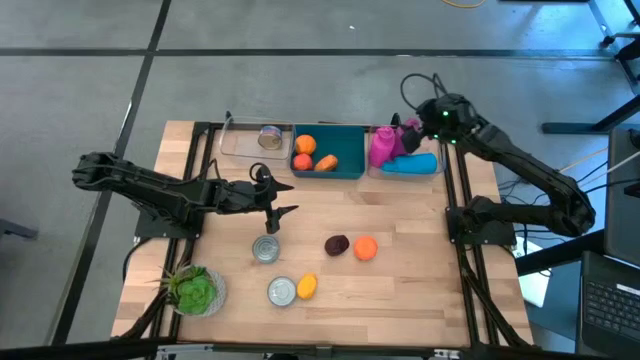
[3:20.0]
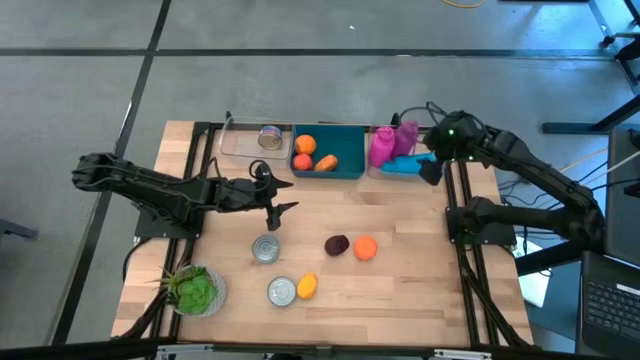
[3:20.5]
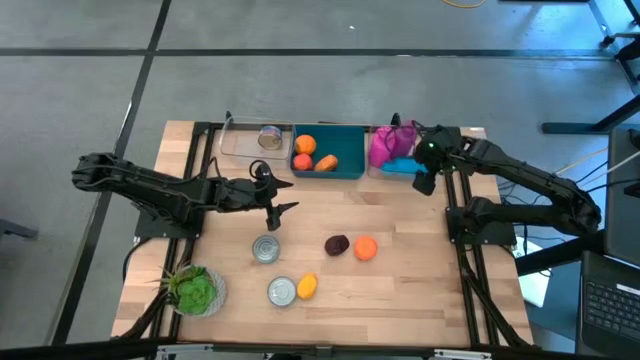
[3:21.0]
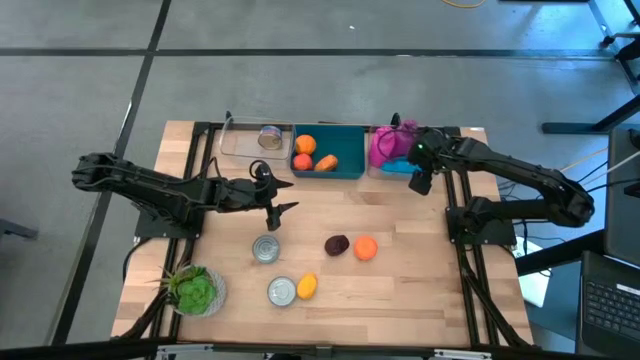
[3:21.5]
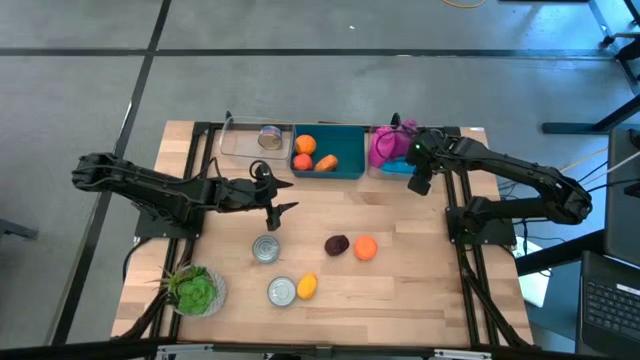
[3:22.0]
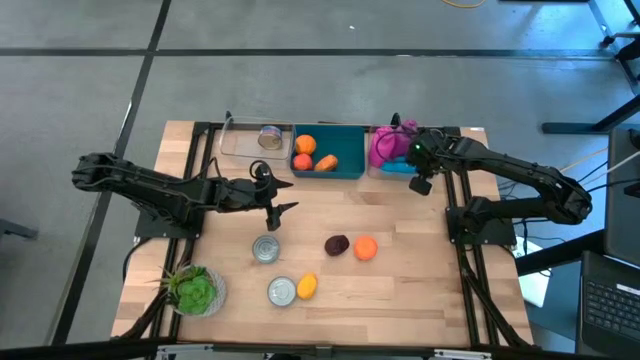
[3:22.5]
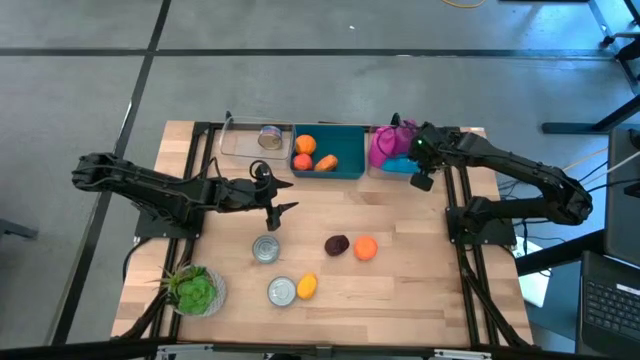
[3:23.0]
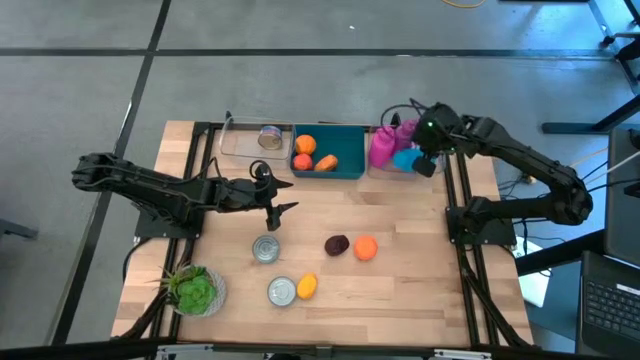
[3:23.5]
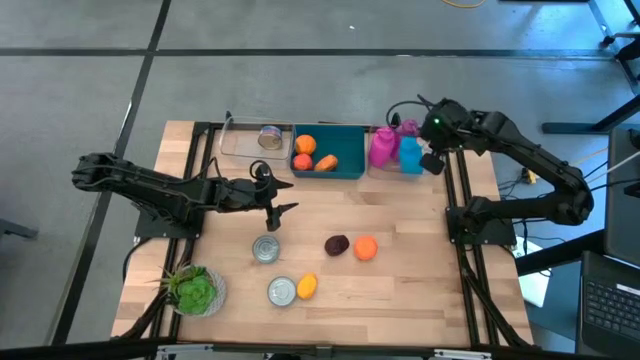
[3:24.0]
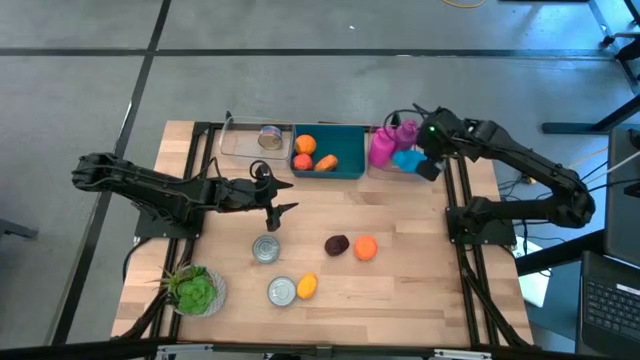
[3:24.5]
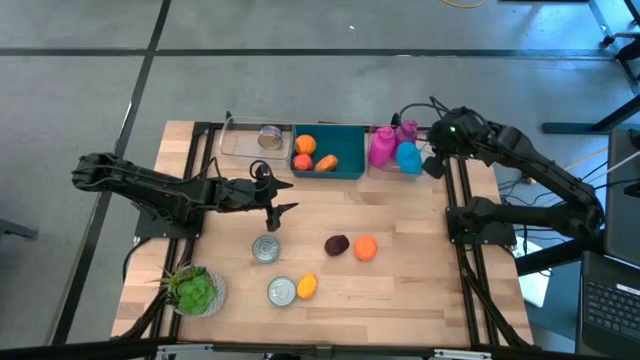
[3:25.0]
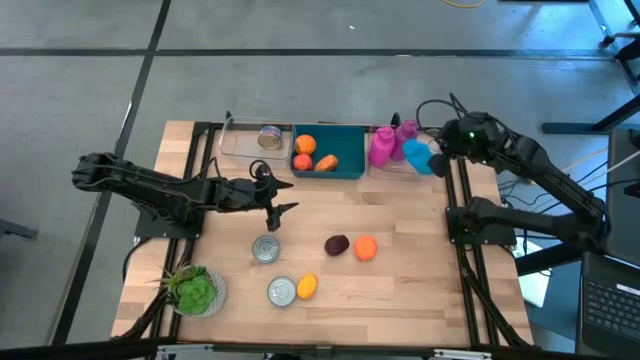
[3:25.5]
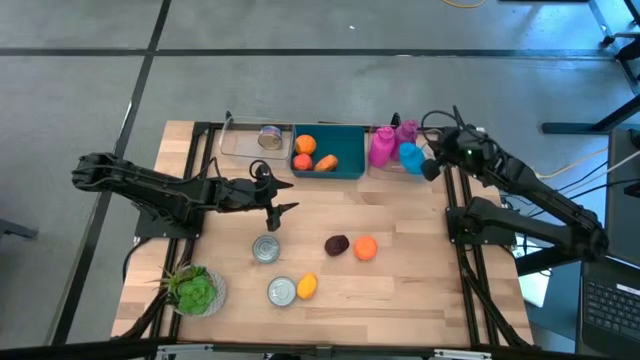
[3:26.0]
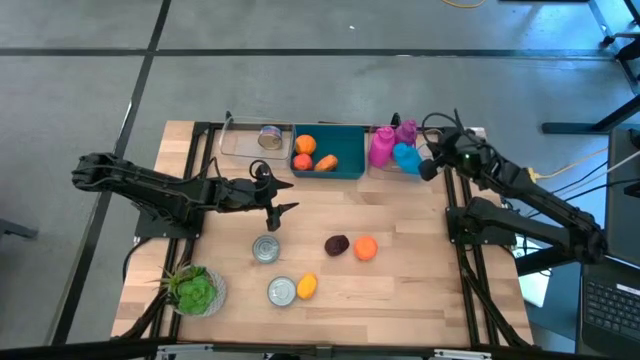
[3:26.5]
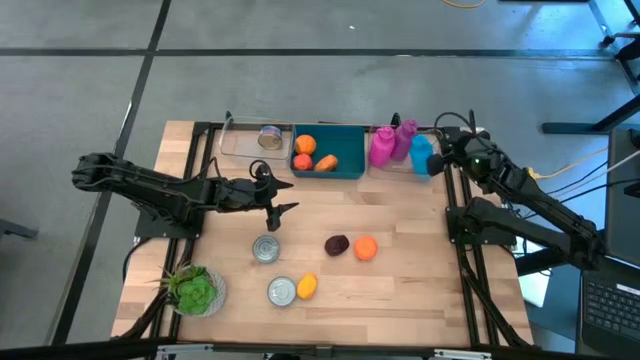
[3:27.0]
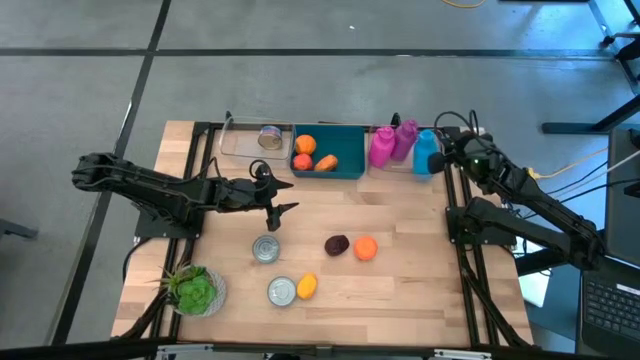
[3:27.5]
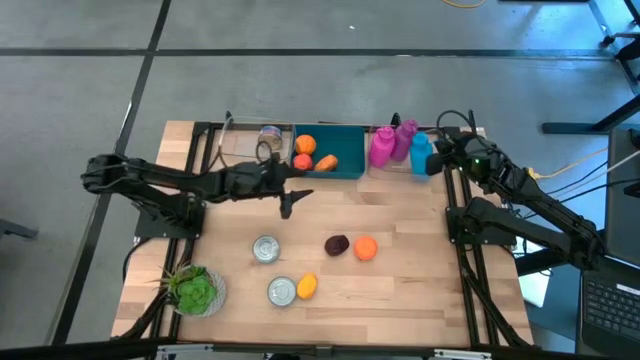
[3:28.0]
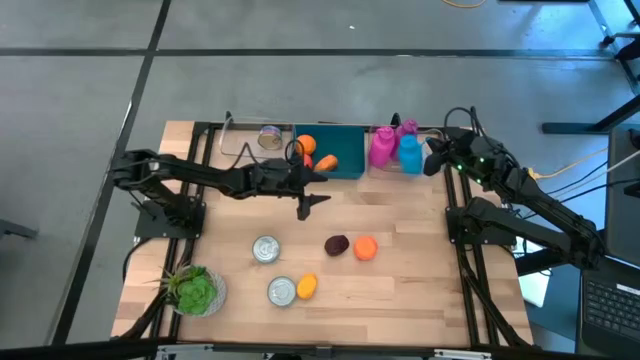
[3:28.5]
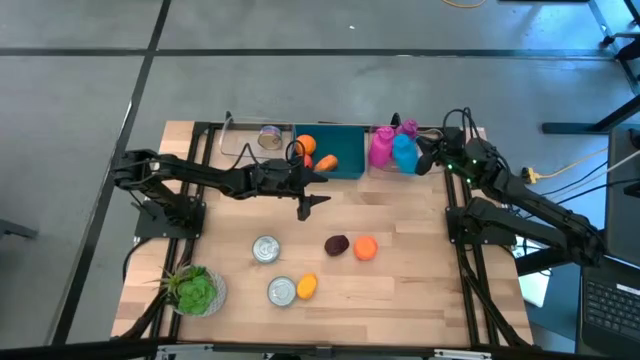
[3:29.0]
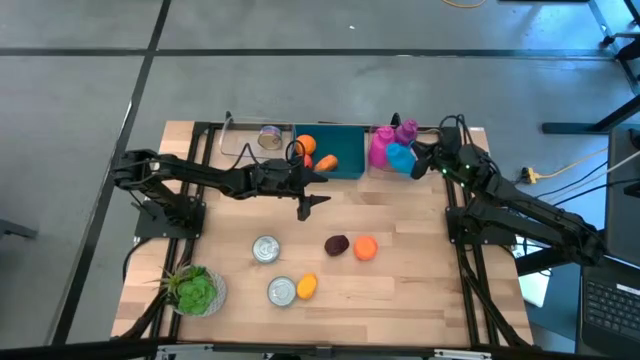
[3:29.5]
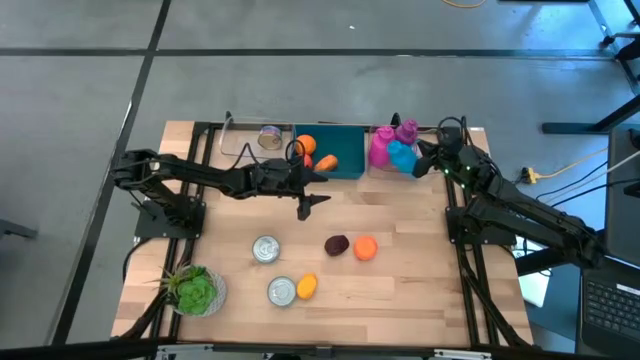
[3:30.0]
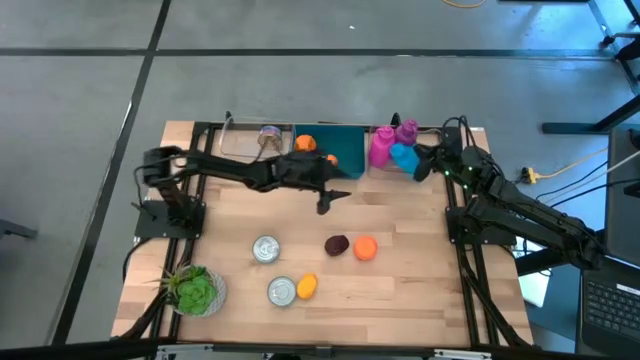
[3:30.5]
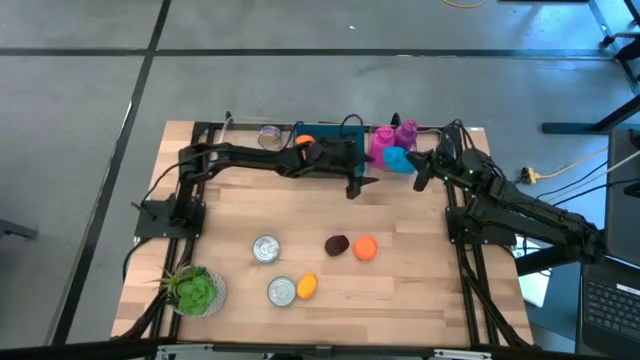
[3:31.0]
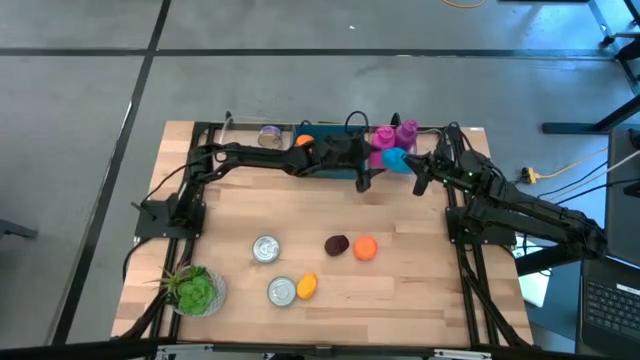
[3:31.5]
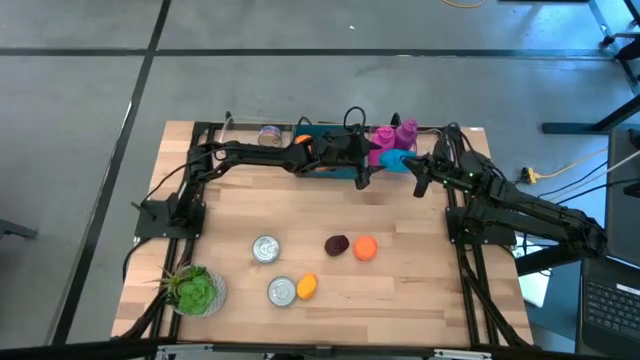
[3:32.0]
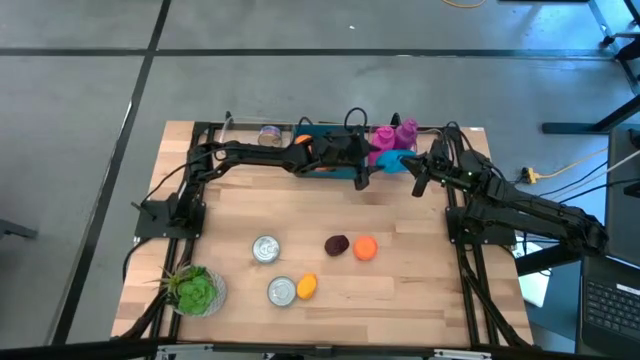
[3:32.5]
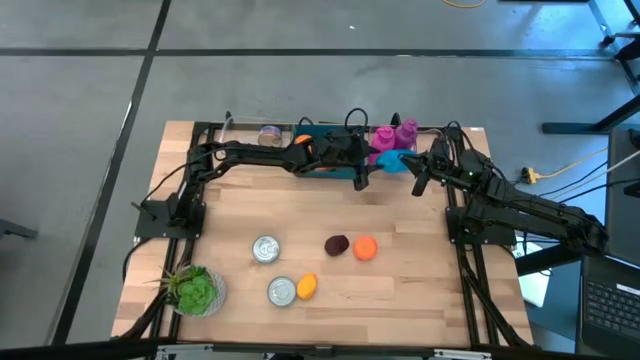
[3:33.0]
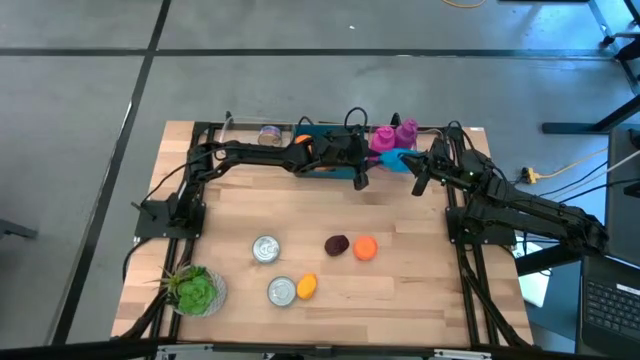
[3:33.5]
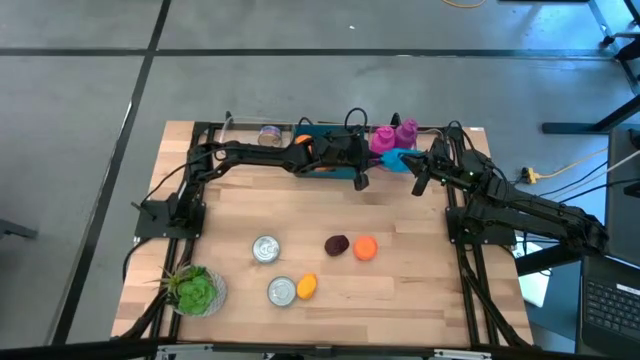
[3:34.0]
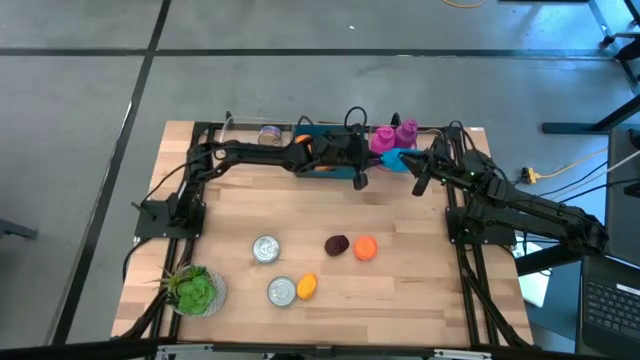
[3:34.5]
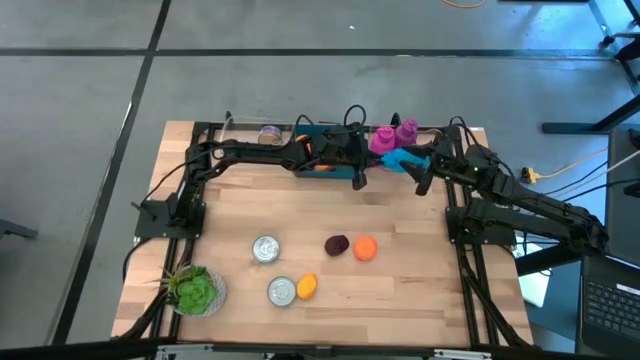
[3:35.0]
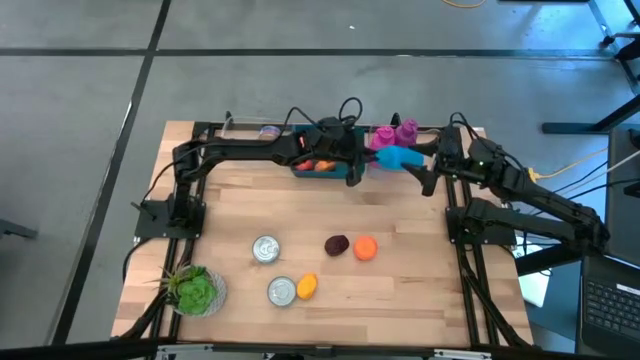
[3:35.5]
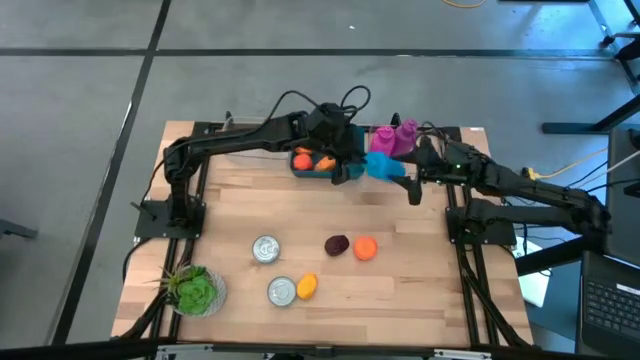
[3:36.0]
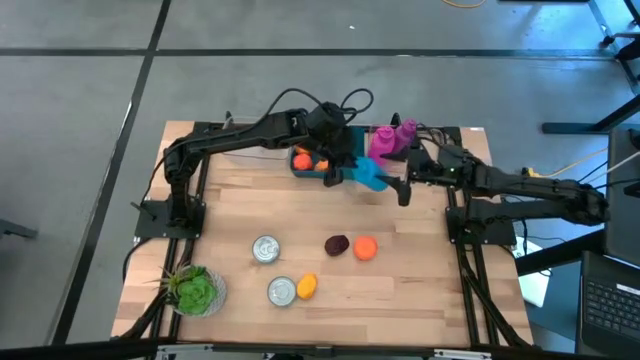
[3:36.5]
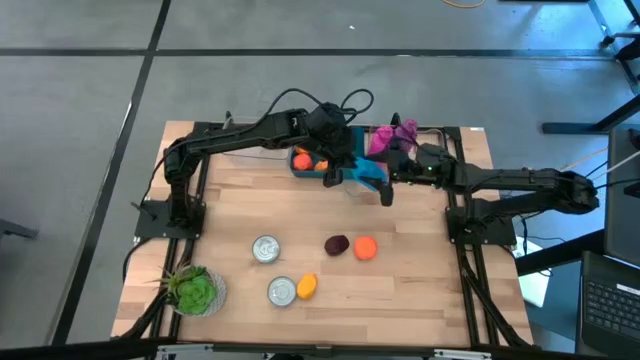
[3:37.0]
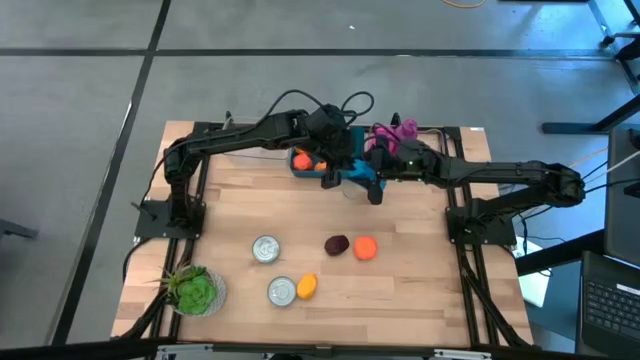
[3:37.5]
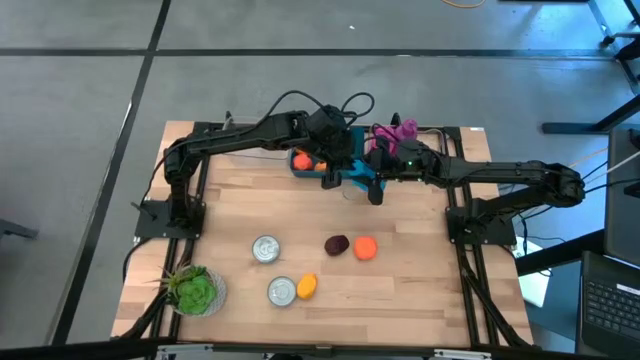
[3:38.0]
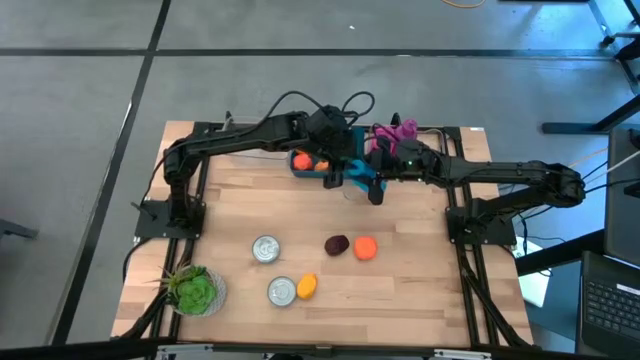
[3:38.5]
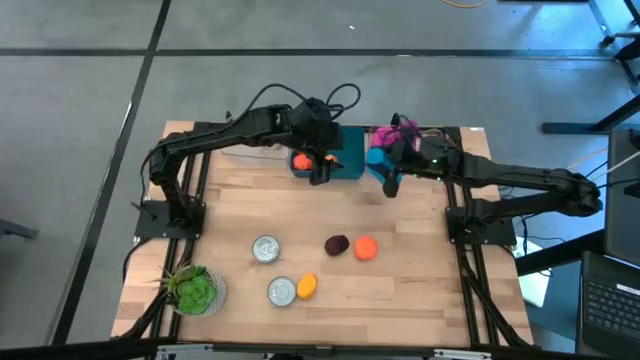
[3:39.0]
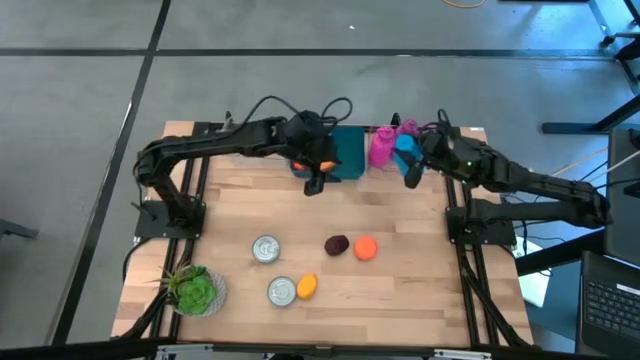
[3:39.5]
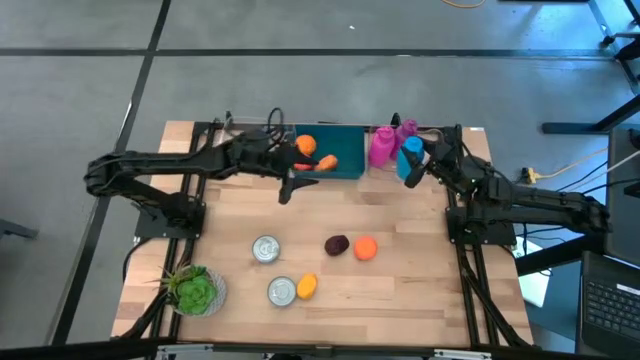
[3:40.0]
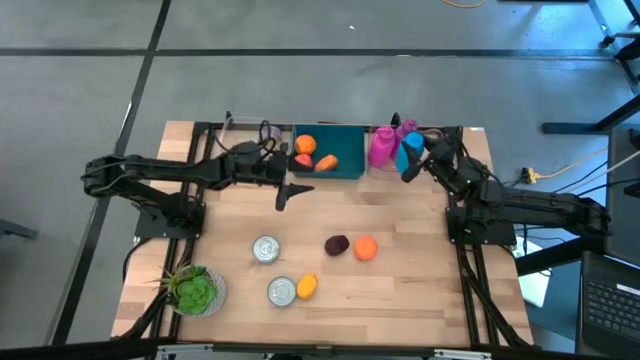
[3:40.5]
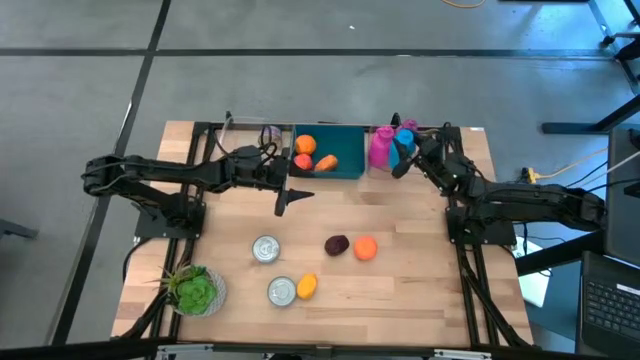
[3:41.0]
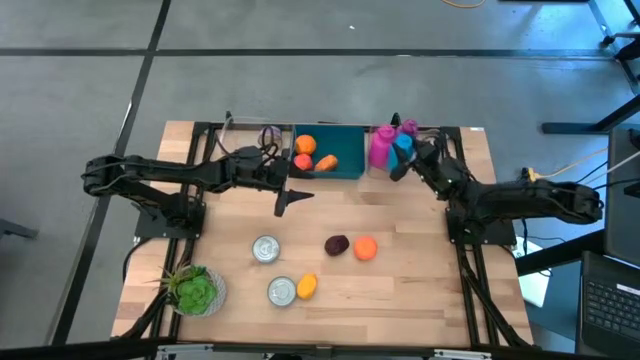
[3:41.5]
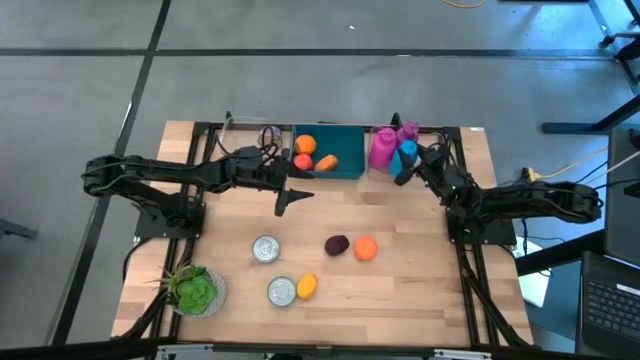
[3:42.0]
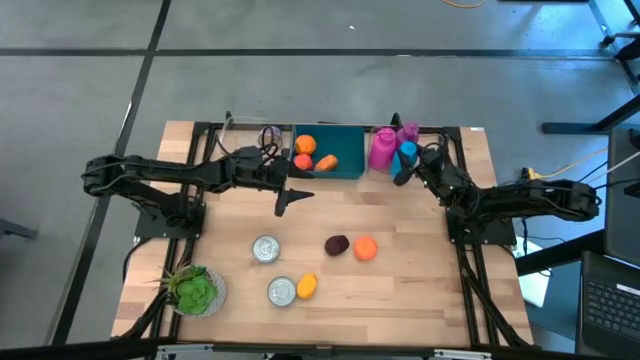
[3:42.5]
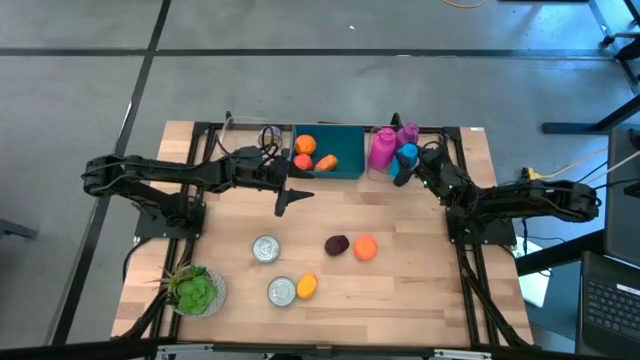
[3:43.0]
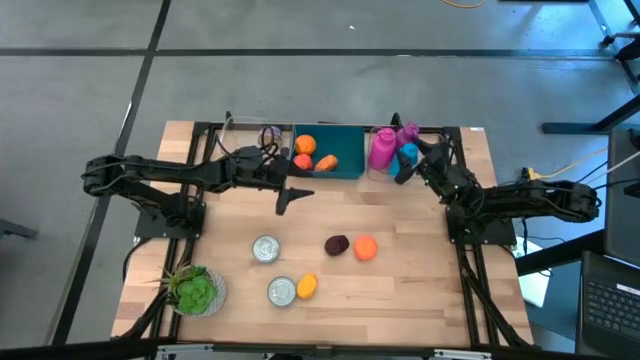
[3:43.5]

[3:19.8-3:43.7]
Task: Pick & Place Food Item
Adjust the blue water bottle
